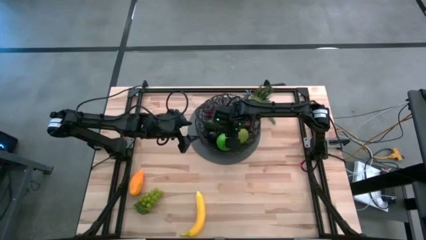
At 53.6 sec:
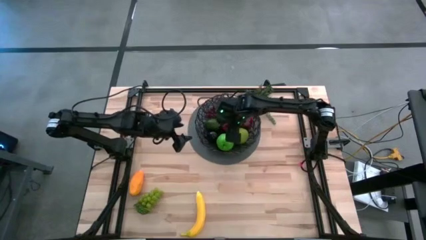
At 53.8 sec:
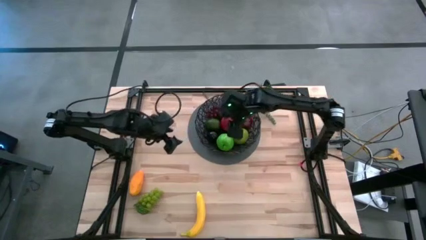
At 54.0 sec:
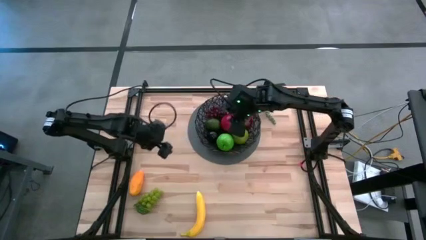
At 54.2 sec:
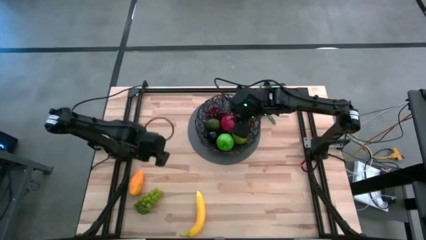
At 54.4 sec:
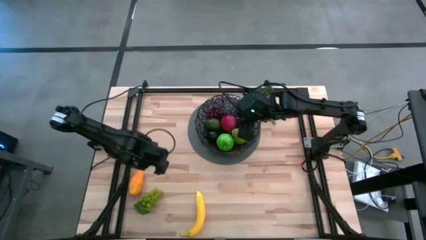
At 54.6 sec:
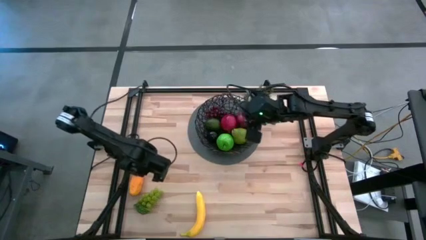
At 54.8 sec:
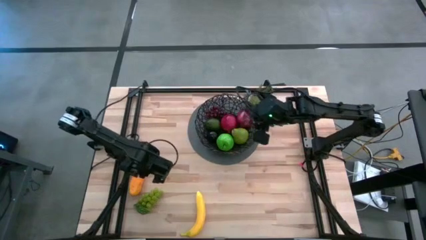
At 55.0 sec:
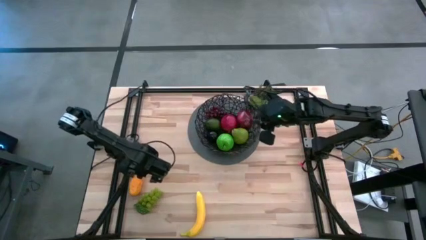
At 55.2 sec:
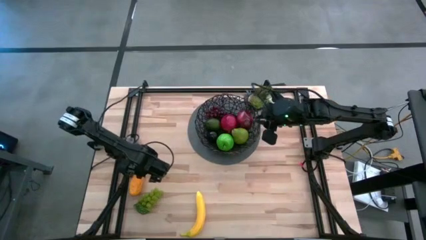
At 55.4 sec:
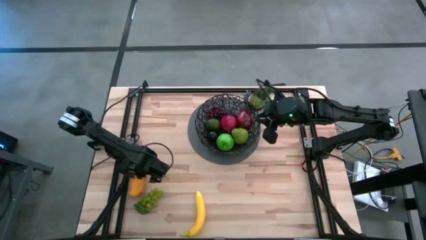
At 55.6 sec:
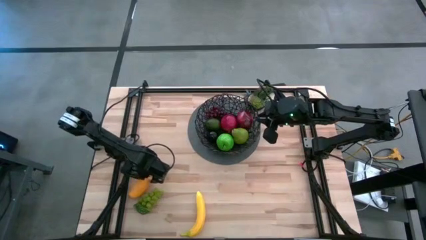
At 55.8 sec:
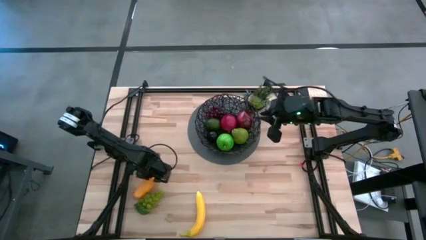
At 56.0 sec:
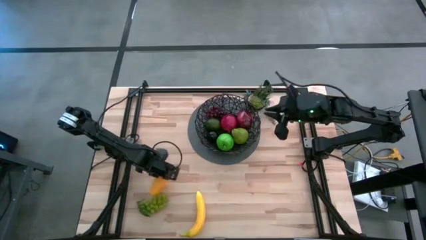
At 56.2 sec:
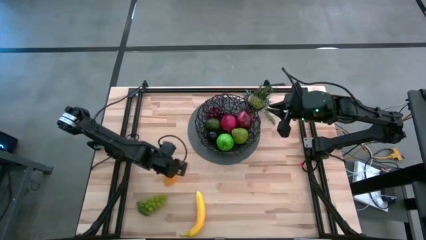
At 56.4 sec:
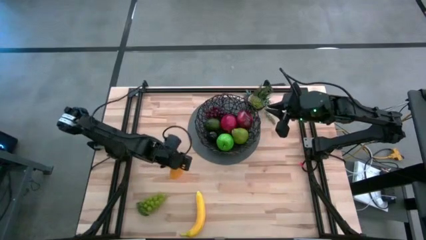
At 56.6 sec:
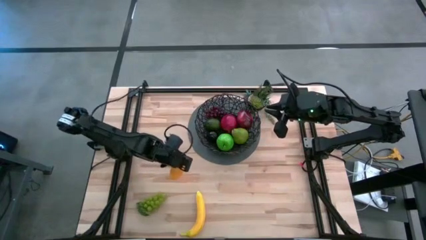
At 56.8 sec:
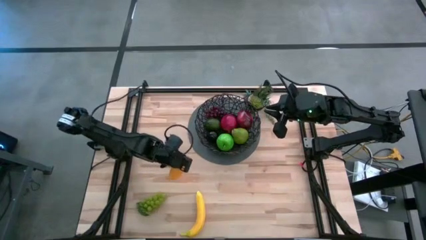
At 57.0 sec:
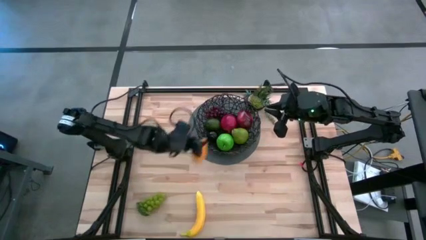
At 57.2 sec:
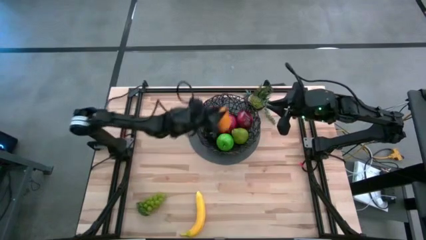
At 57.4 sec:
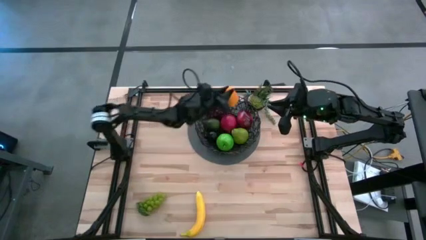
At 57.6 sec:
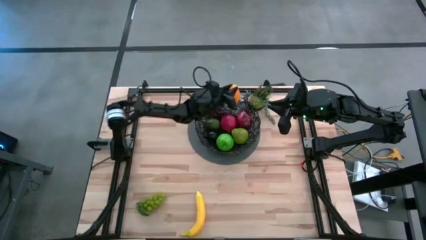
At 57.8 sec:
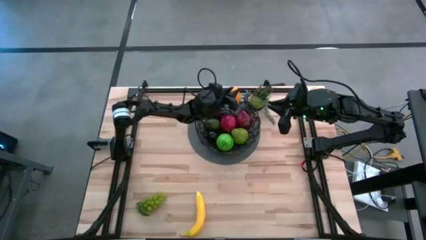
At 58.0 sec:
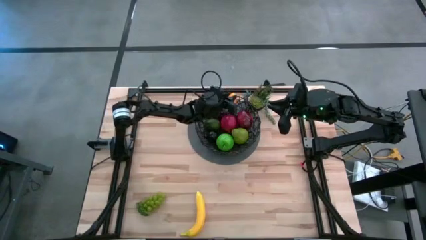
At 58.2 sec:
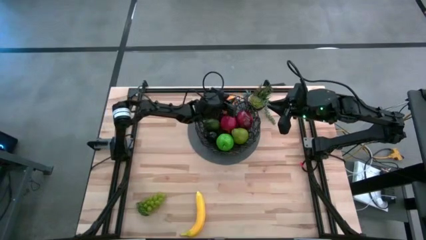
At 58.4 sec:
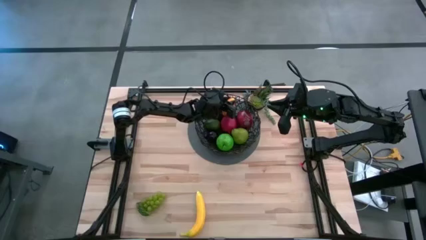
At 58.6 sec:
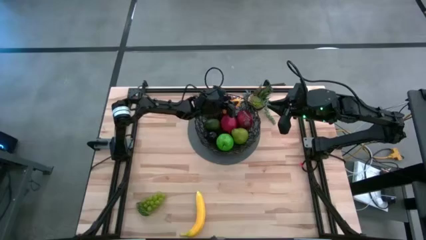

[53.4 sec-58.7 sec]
Task: Build produce basket
Put the yellow mango into the black basket

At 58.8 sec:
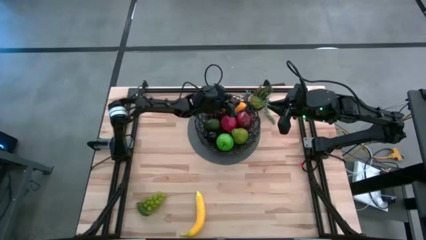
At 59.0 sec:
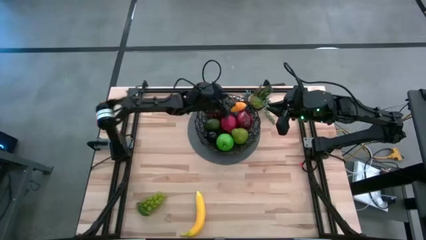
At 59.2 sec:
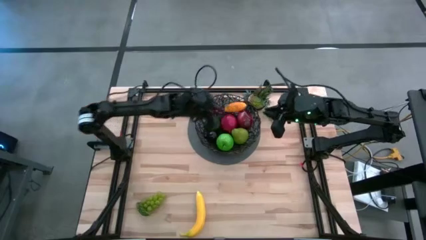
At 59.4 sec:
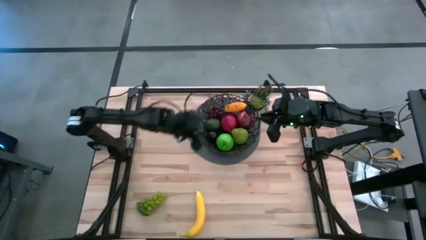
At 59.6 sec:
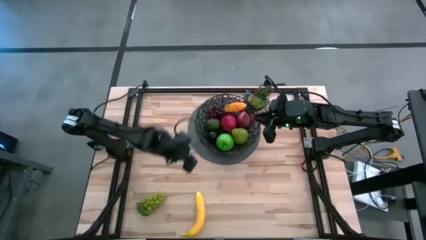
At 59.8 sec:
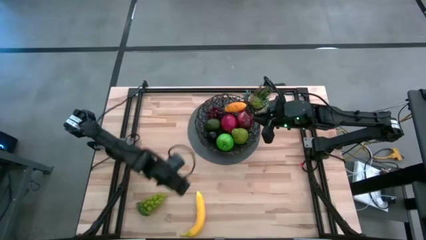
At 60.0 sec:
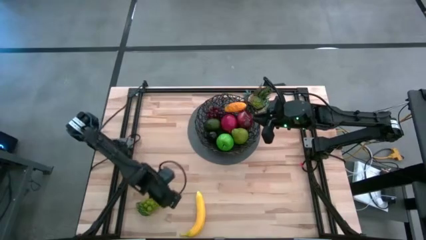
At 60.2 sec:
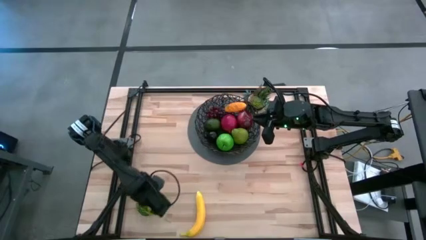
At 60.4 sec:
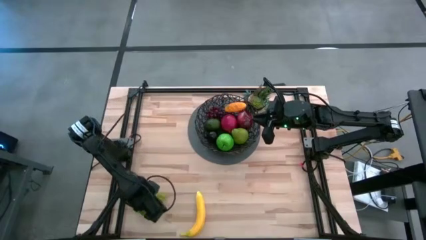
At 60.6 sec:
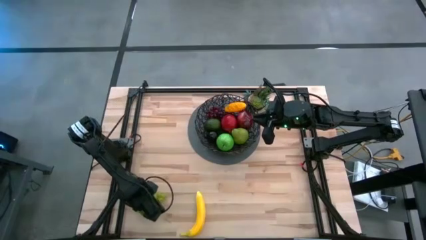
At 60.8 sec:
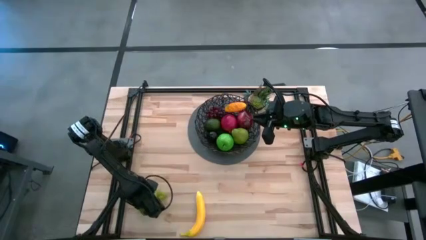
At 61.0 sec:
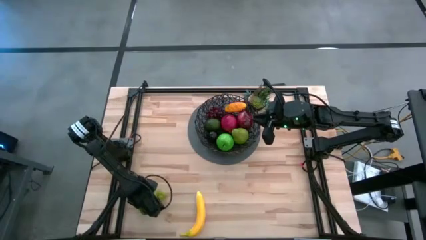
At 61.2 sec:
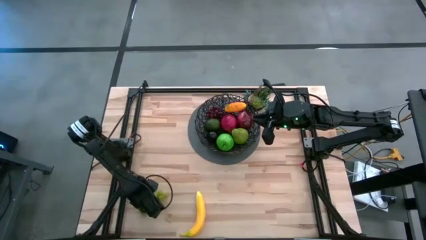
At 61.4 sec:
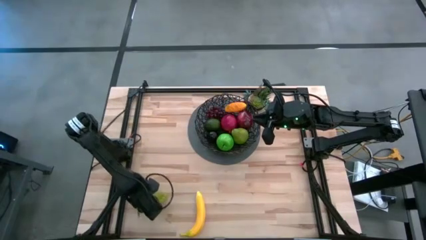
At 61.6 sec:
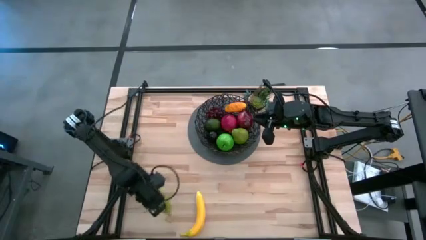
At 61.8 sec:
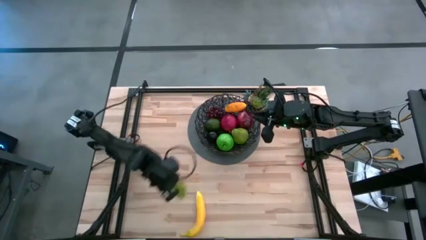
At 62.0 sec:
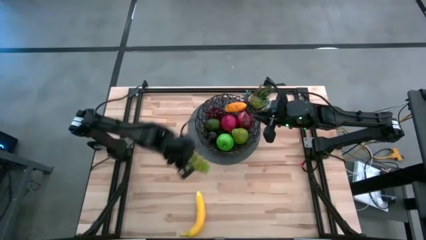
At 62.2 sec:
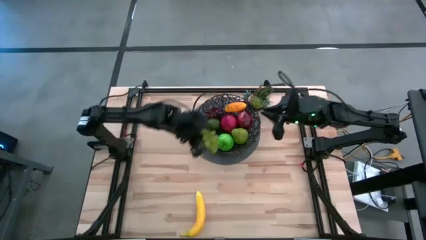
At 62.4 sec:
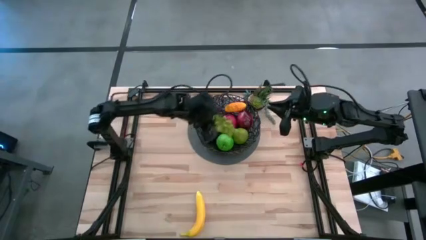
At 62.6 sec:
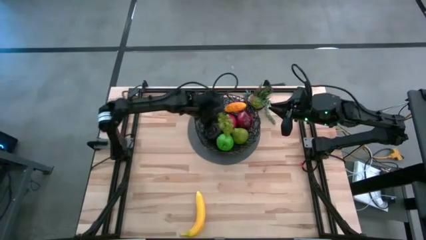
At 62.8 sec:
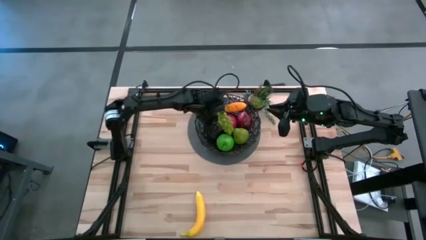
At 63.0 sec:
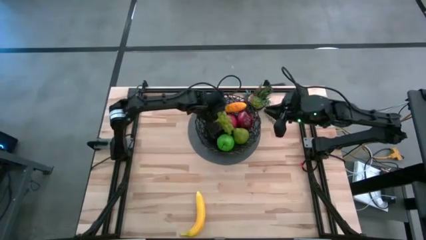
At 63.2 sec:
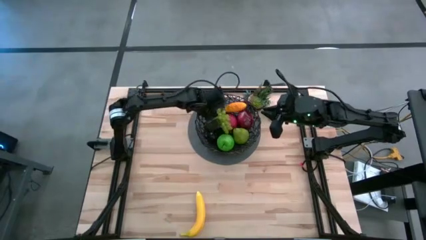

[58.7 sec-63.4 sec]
Put the green grapes into the black basket

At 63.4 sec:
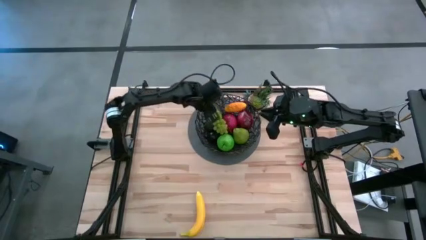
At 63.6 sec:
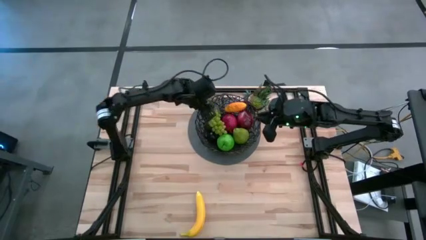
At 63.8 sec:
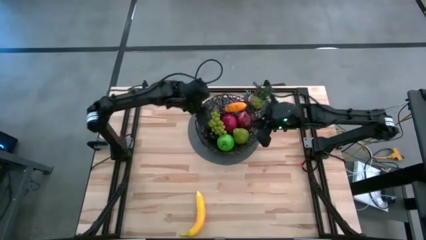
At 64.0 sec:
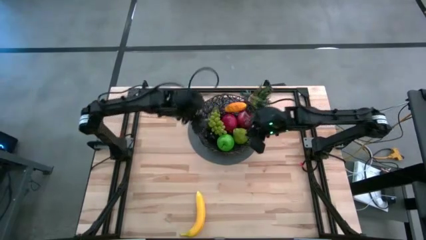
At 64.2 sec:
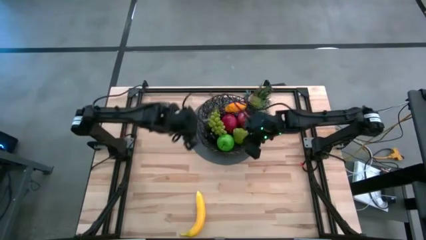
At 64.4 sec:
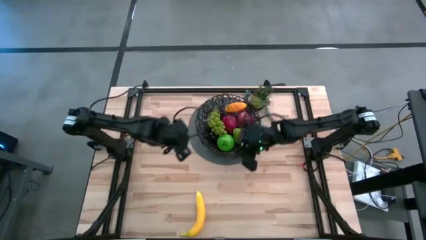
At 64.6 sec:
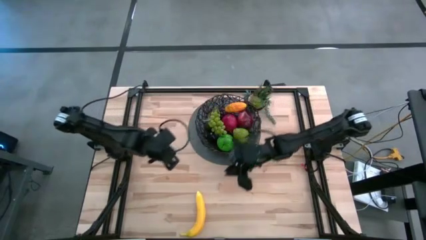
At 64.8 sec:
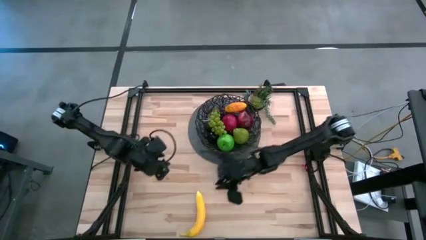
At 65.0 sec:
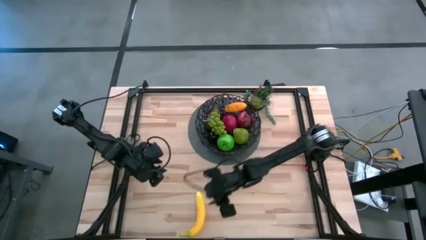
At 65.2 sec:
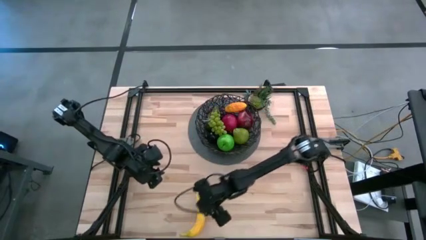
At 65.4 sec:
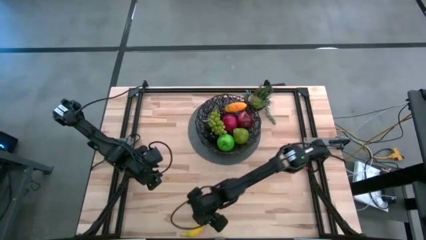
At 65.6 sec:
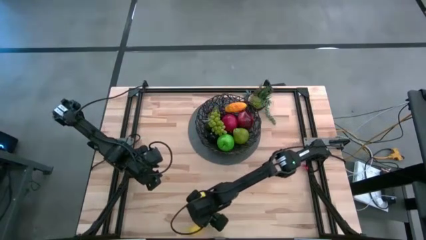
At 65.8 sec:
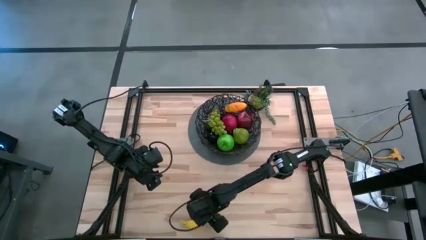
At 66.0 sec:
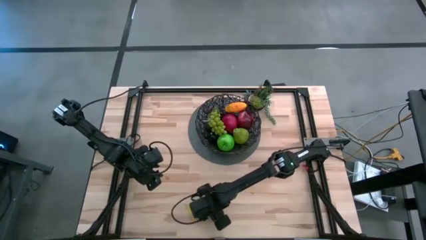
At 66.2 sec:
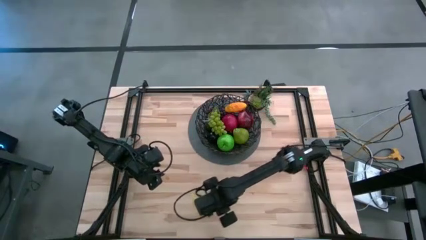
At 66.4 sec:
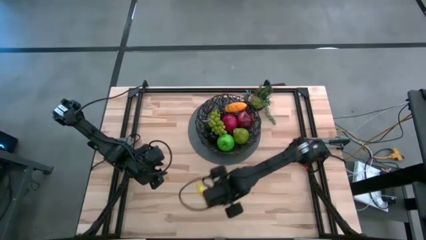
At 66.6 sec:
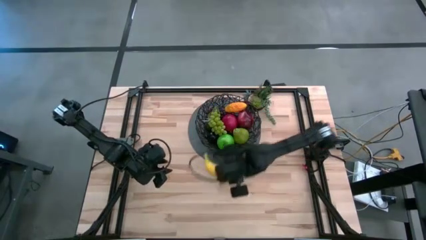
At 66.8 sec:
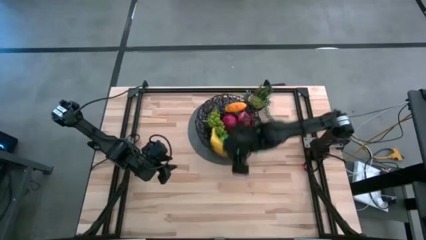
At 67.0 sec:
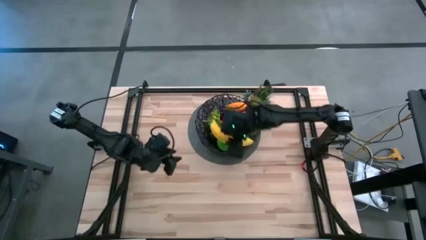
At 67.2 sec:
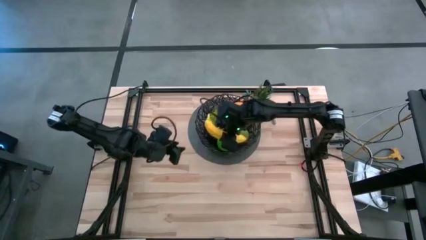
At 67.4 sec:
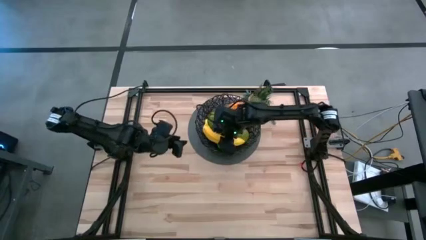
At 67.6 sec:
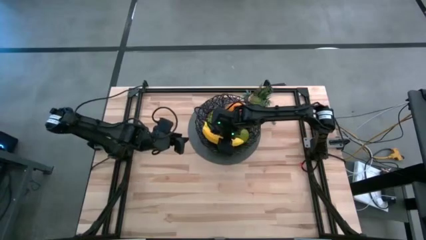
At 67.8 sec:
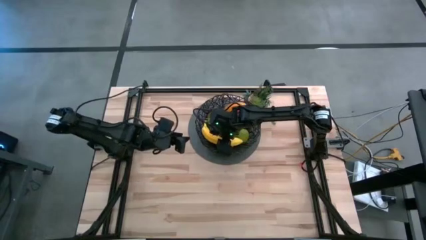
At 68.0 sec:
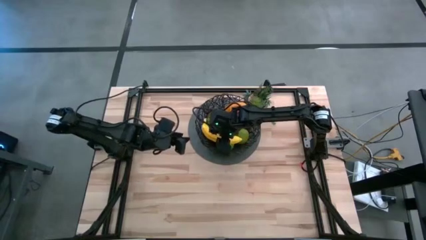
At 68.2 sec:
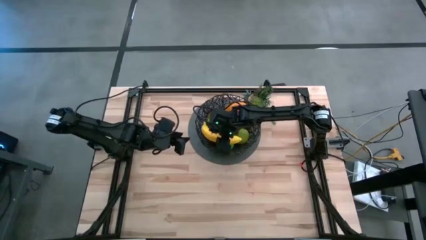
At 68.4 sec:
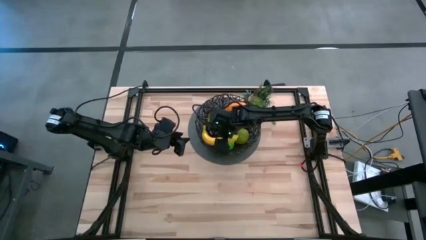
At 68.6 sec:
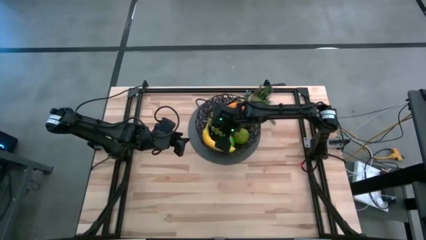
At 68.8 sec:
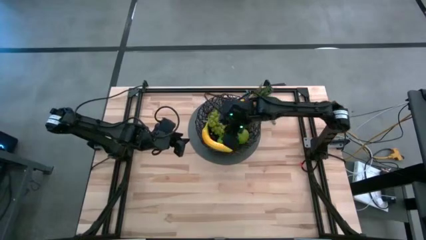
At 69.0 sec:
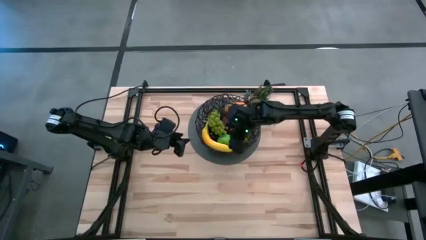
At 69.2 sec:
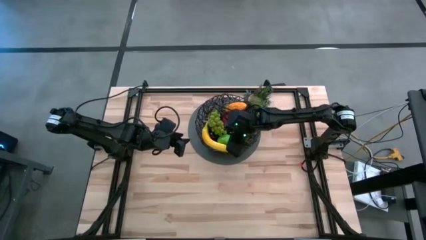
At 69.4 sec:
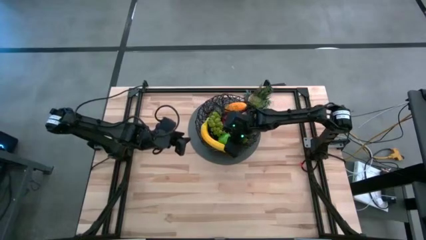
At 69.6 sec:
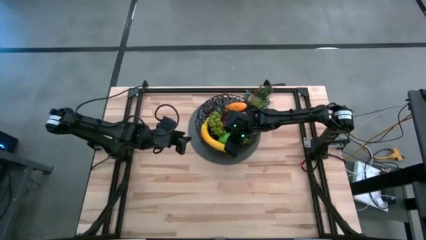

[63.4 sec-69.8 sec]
Put the yellow banana into the black basket
